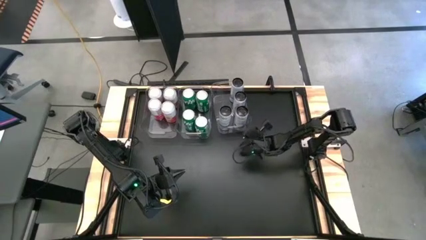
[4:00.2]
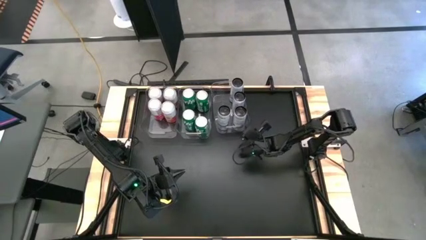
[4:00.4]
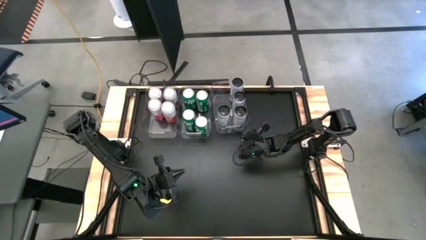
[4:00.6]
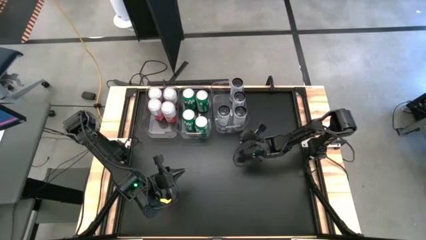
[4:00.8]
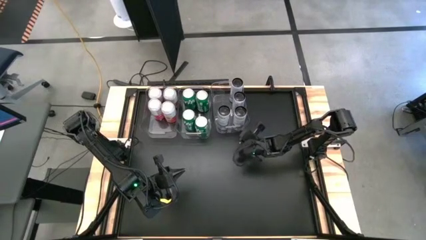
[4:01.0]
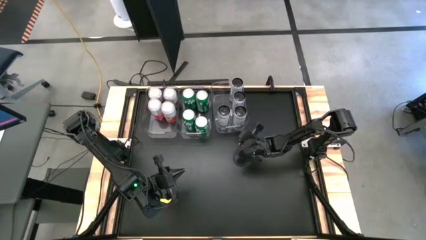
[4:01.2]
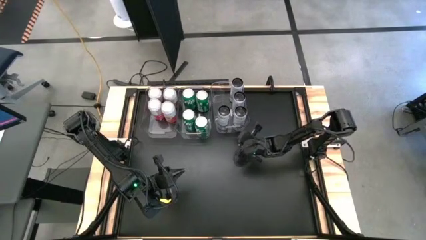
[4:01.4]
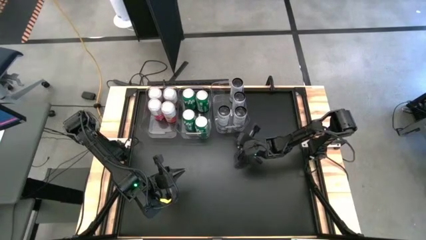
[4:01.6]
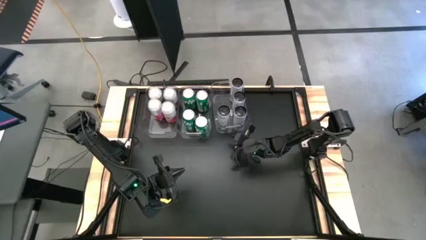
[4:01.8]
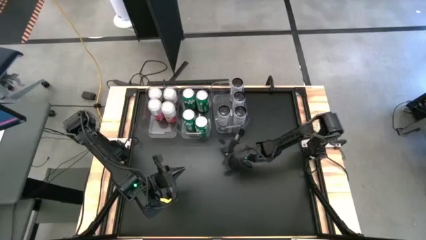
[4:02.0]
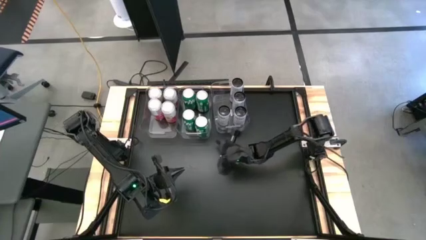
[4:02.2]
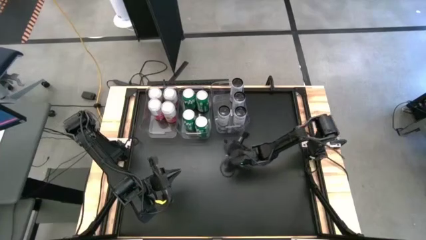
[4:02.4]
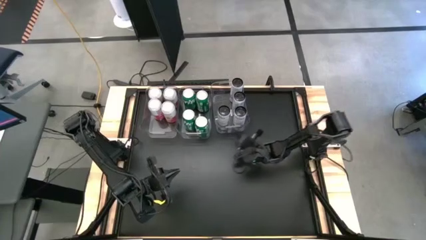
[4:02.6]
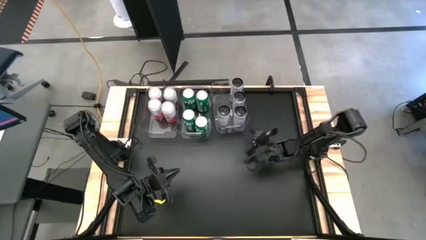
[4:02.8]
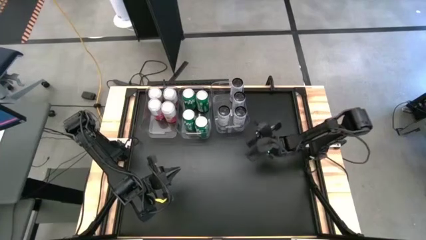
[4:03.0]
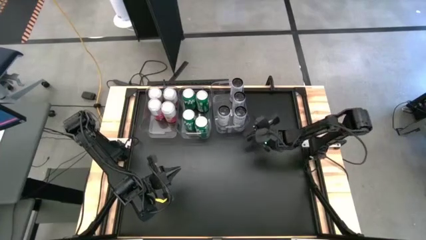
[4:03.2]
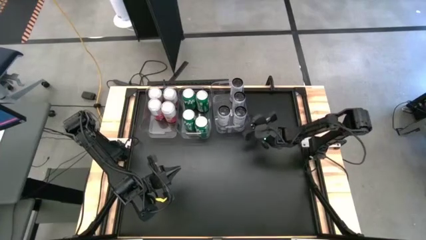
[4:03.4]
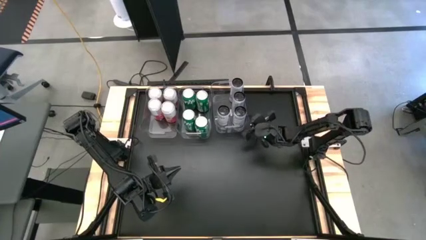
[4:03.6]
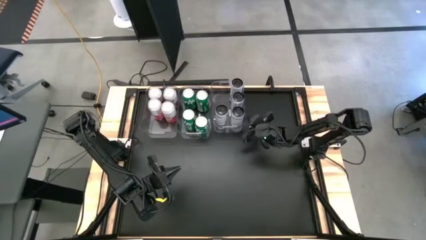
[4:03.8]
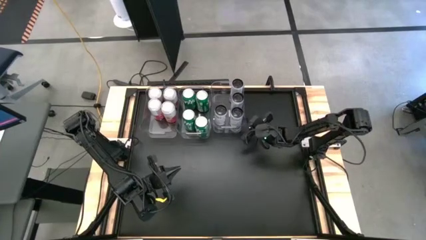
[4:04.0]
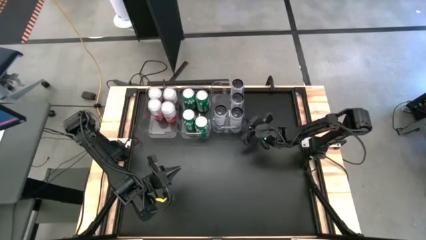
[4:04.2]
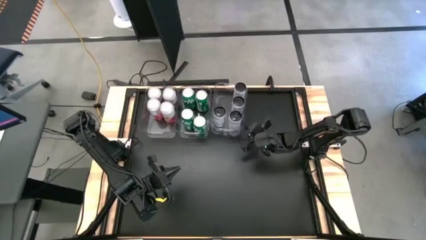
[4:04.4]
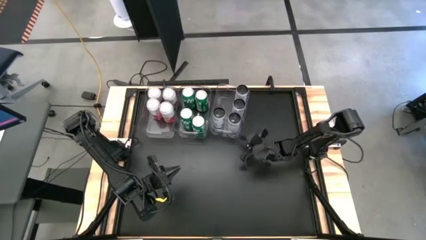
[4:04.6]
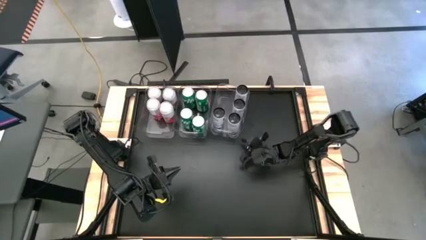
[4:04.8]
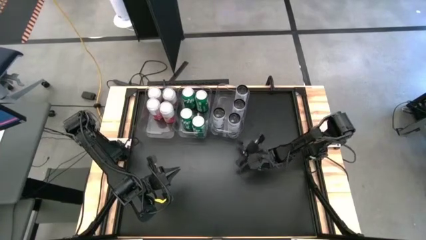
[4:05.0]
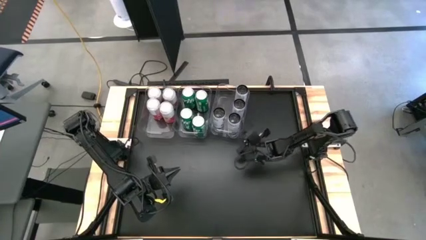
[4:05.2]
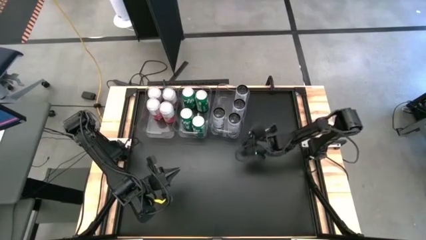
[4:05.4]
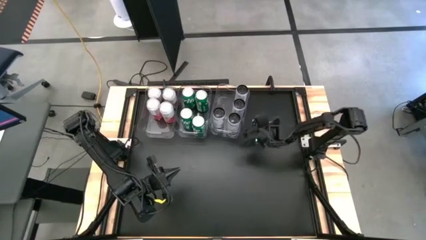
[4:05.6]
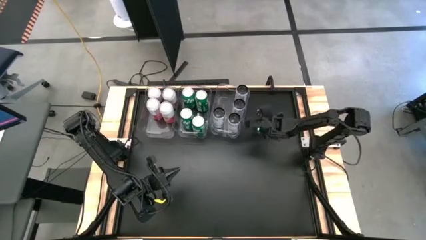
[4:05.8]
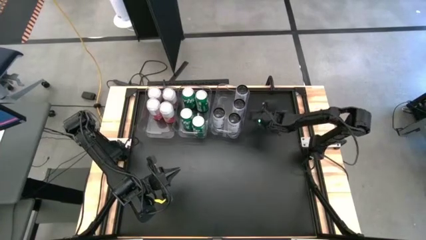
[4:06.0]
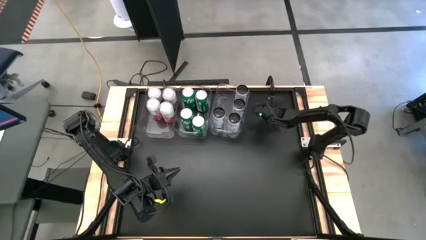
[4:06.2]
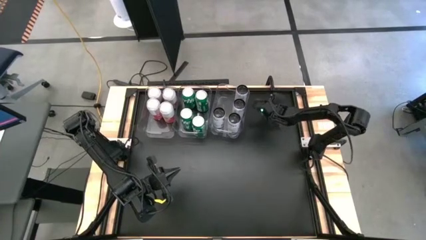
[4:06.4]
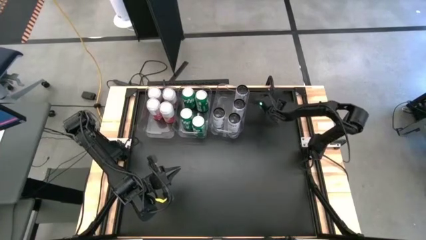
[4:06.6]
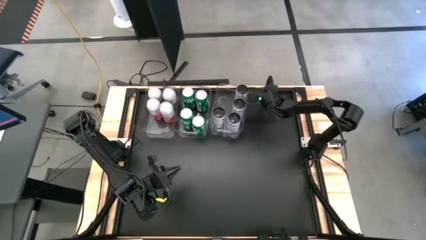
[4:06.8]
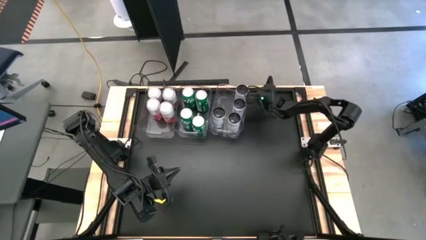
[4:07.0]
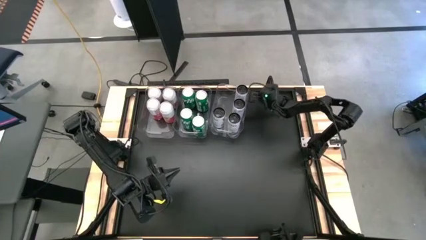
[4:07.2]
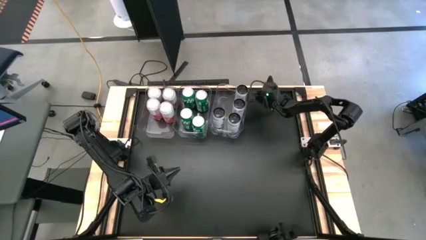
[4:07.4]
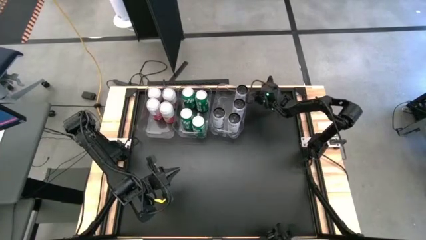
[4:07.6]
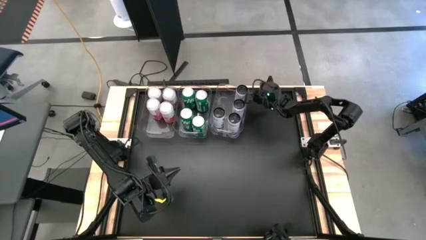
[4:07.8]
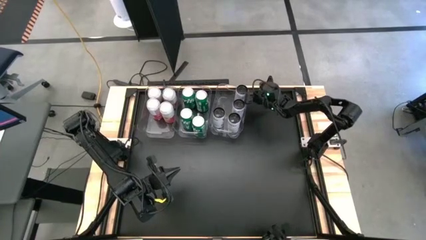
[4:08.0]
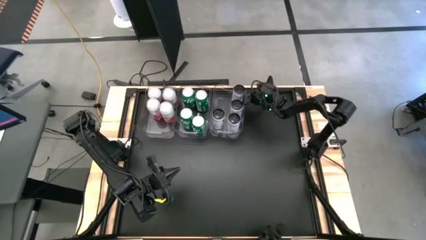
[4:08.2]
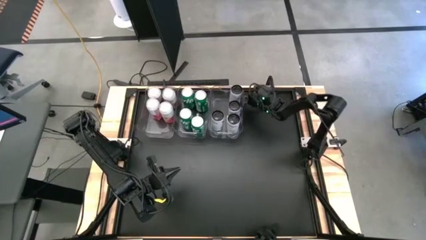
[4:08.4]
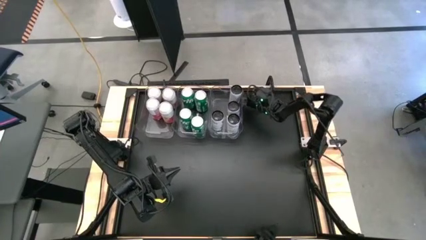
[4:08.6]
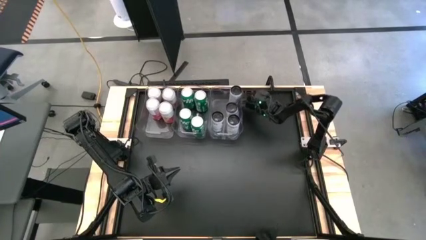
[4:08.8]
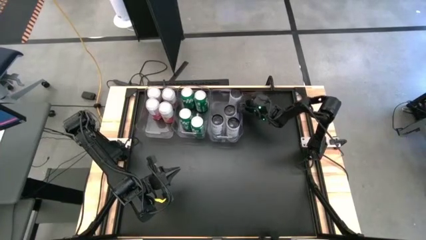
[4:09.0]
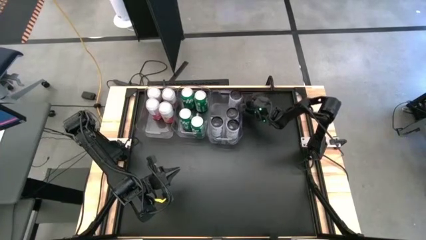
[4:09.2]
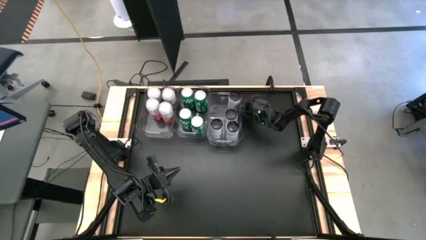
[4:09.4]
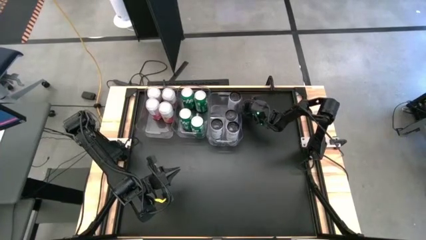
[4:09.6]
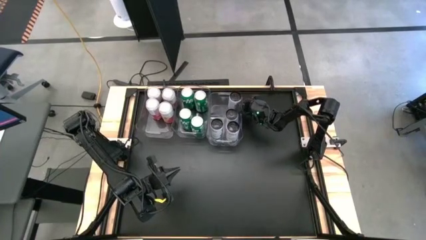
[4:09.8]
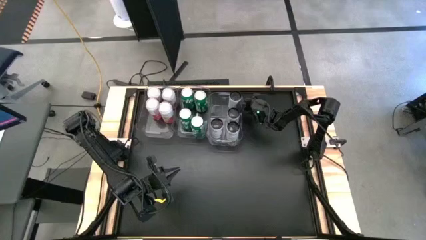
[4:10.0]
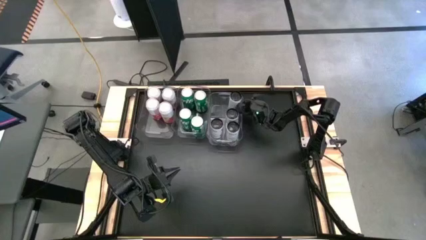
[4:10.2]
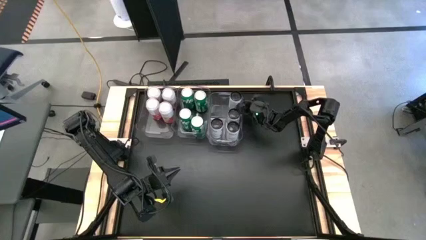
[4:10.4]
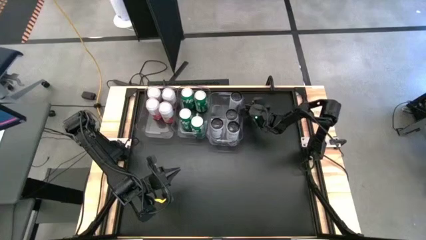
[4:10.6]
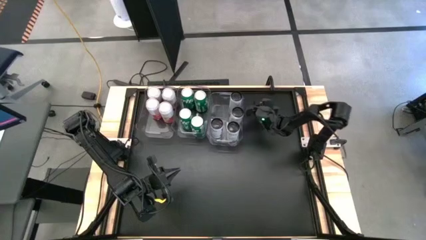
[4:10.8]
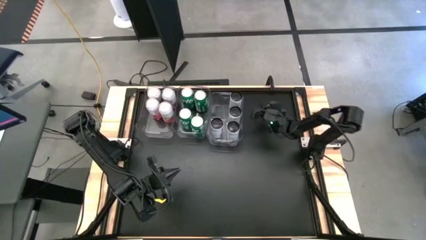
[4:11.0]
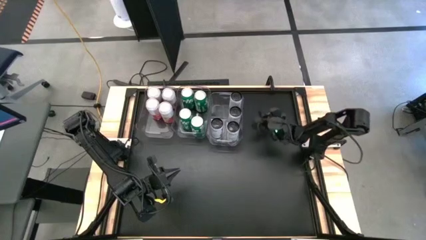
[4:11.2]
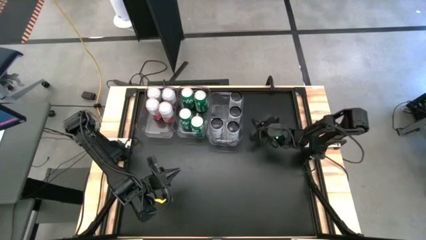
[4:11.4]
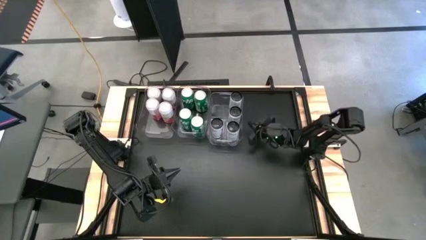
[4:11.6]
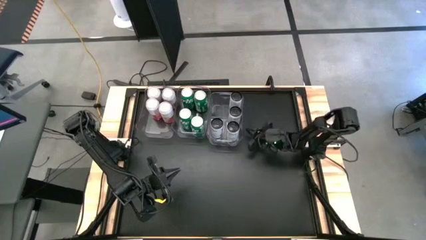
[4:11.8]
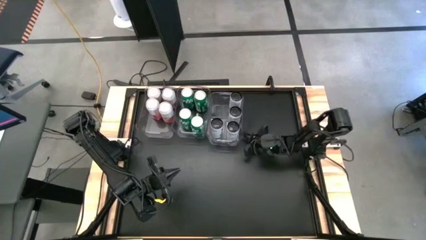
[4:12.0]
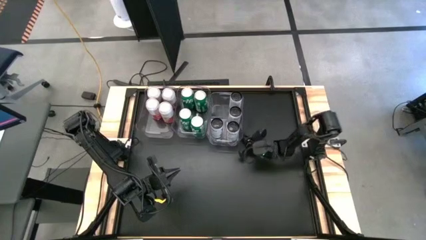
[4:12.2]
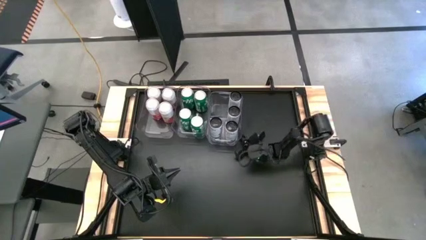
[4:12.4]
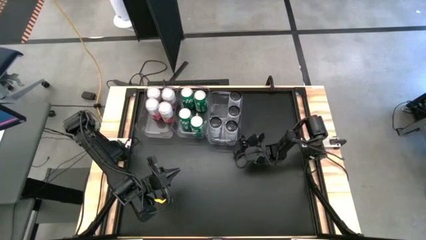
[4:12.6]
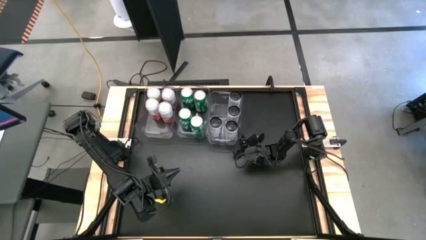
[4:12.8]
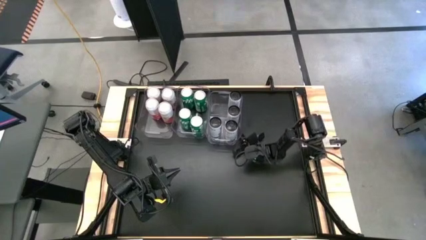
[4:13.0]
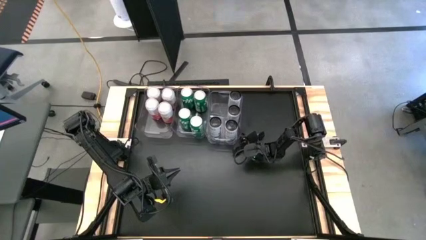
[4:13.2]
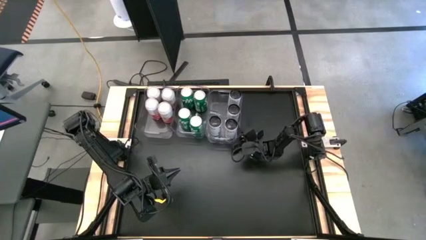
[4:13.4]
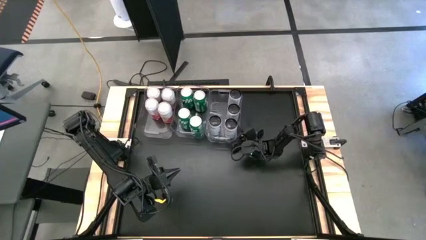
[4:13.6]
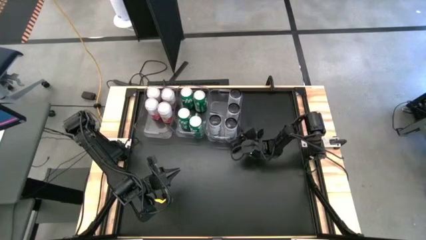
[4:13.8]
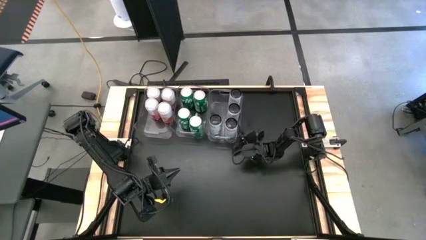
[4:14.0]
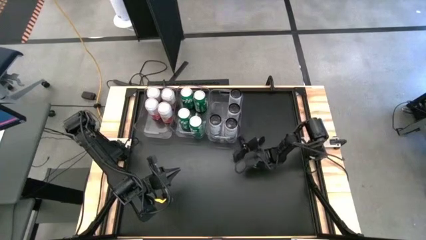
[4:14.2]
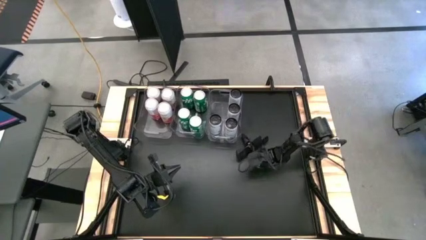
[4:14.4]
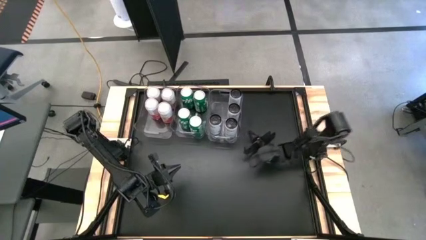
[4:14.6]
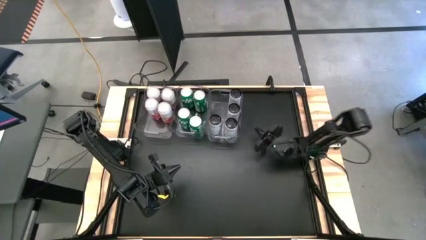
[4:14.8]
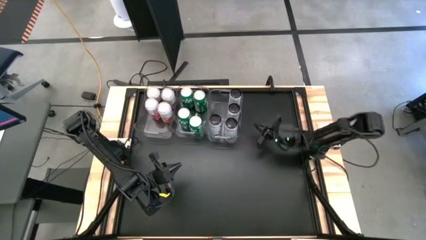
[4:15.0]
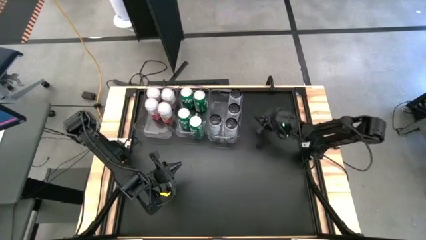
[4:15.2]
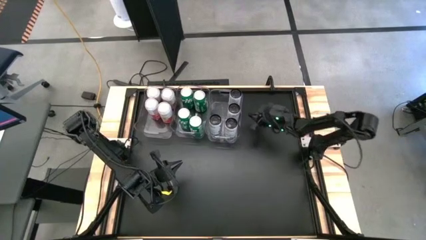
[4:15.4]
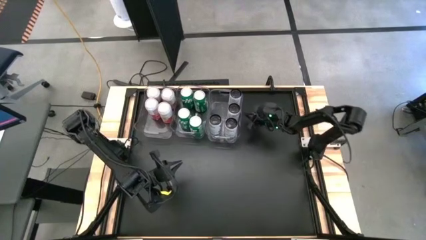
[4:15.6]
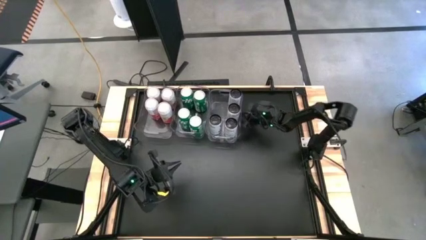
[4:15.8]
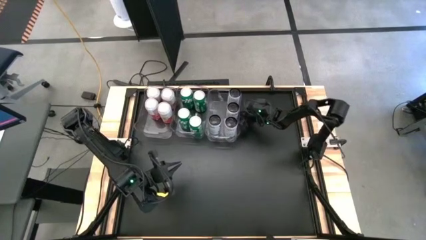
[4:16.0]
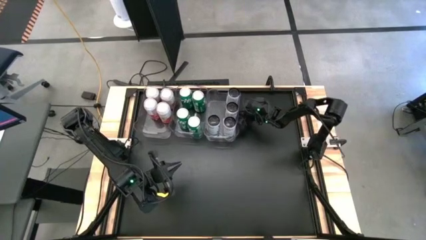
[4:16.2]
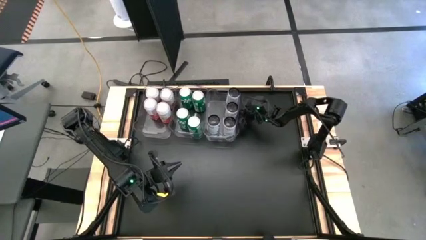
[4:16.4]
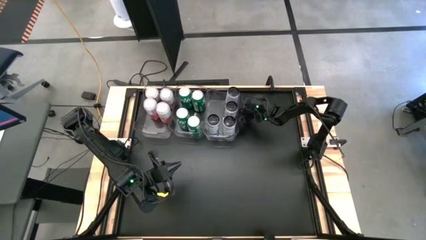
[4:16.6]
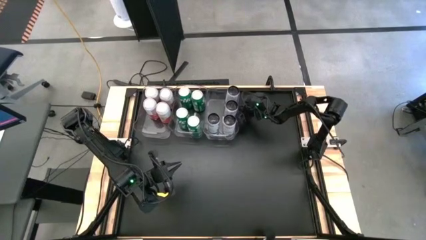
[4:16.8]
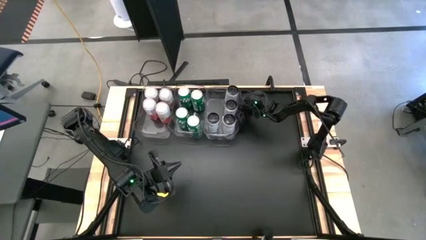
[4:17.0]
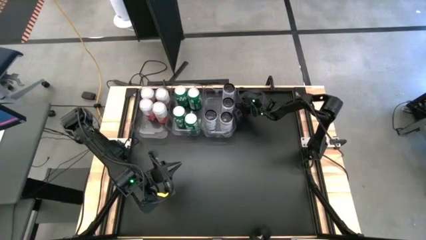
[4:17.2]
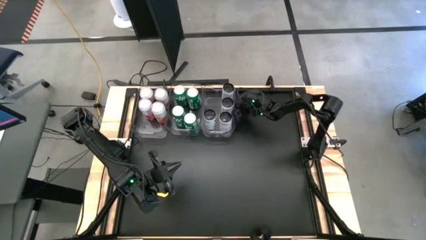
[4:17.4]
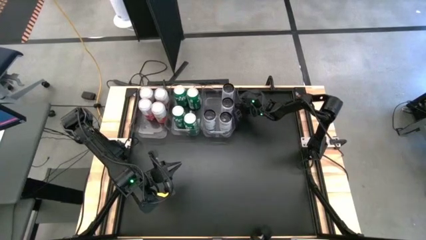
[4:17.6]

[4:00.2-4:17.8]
Task: Sort soda cans
Move the bottom transparent bin to the right side of the top left transparent bin
